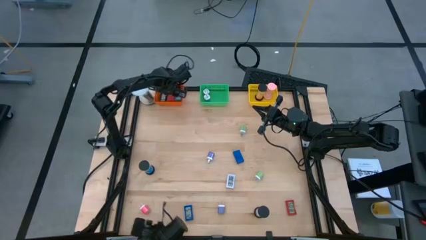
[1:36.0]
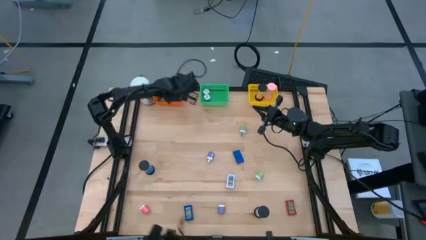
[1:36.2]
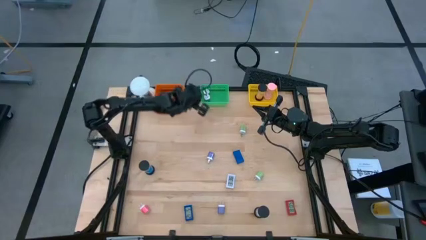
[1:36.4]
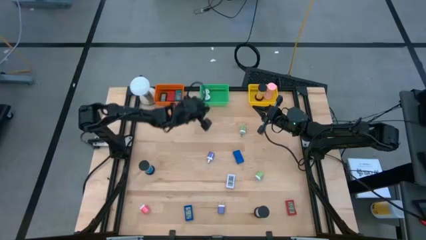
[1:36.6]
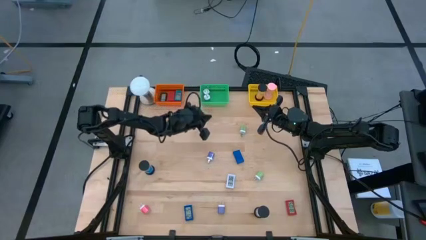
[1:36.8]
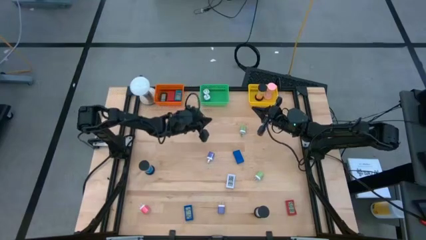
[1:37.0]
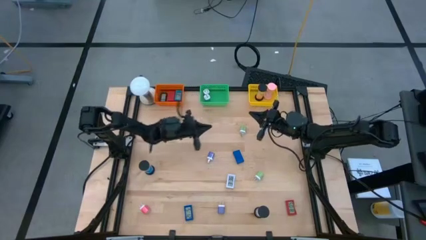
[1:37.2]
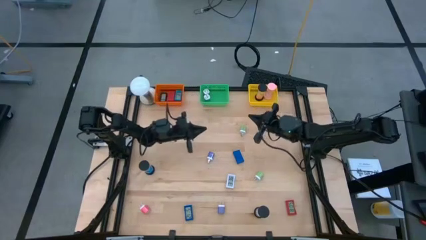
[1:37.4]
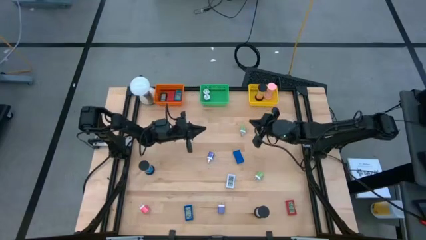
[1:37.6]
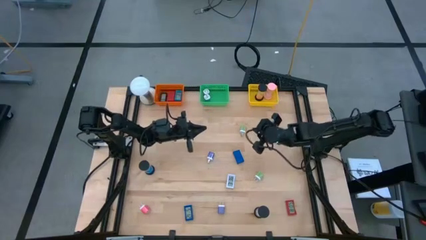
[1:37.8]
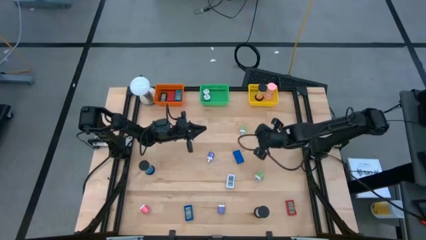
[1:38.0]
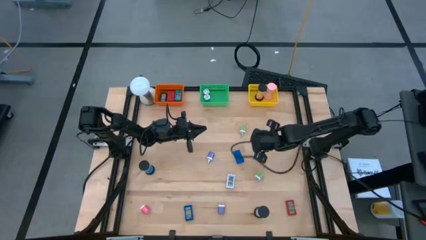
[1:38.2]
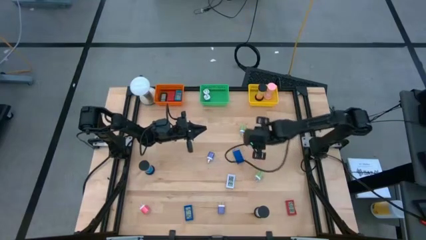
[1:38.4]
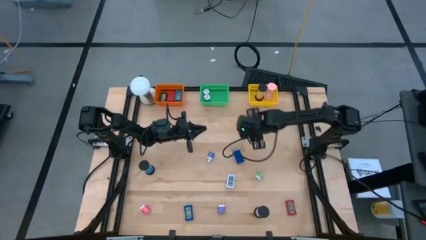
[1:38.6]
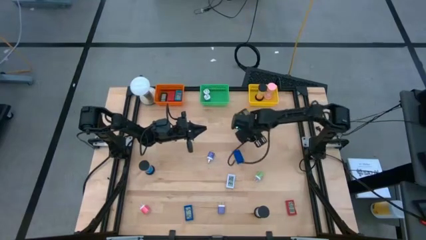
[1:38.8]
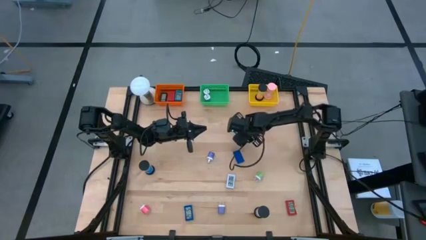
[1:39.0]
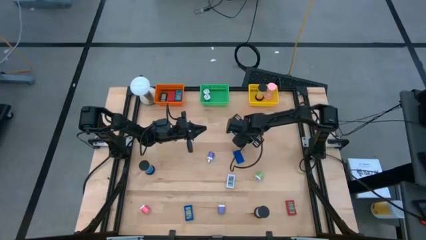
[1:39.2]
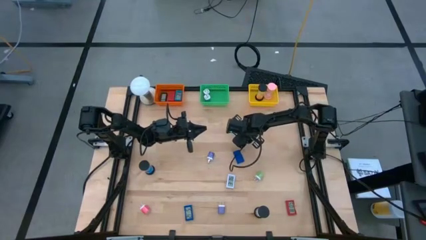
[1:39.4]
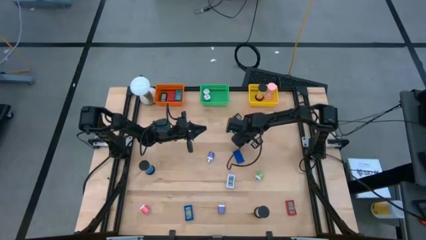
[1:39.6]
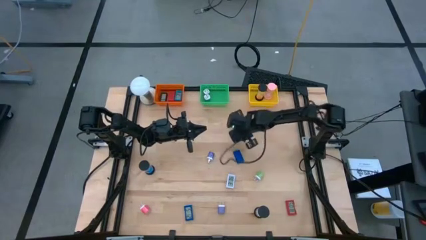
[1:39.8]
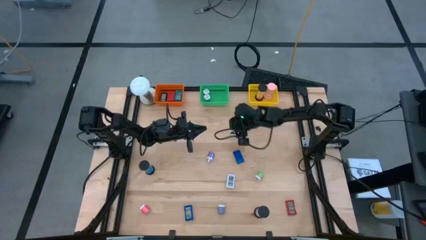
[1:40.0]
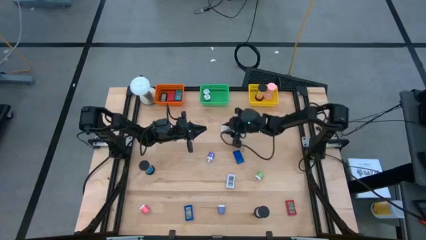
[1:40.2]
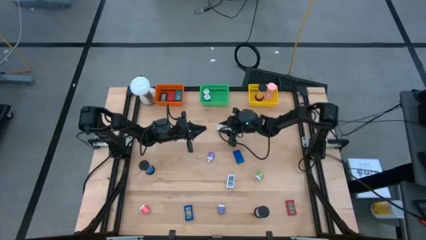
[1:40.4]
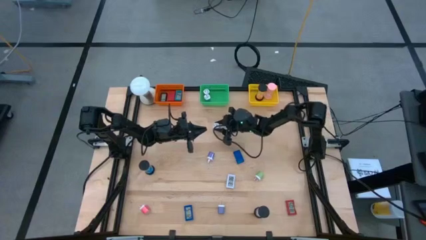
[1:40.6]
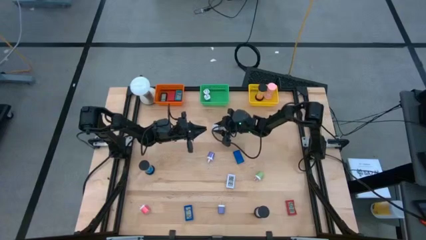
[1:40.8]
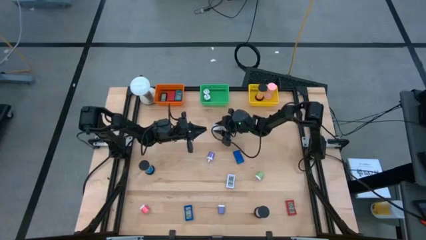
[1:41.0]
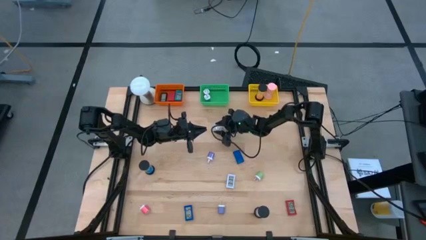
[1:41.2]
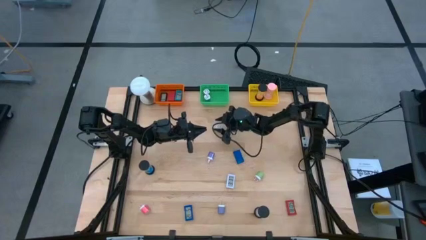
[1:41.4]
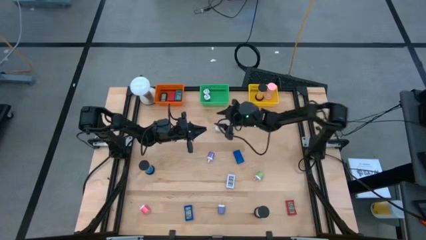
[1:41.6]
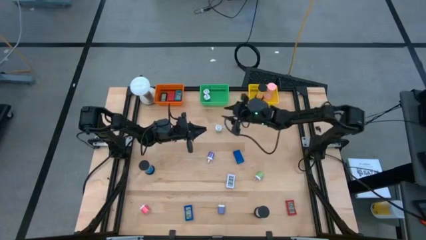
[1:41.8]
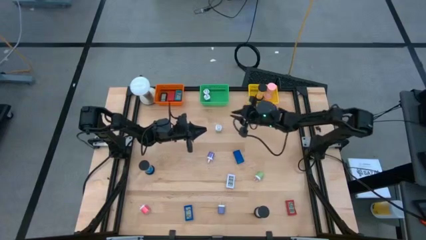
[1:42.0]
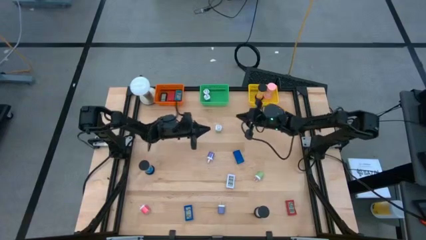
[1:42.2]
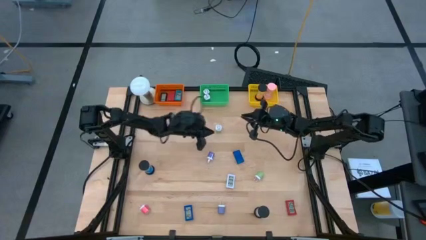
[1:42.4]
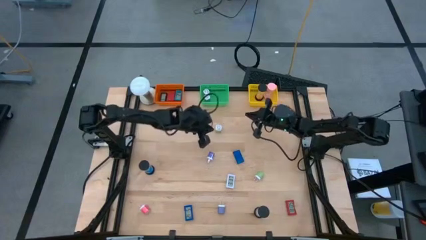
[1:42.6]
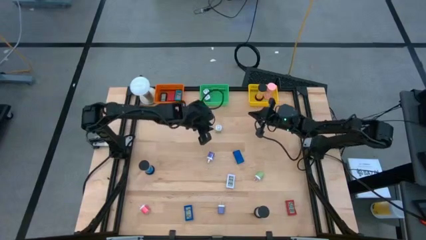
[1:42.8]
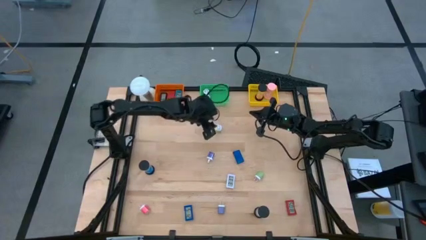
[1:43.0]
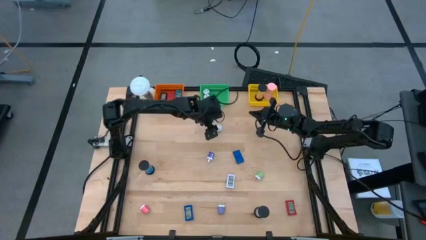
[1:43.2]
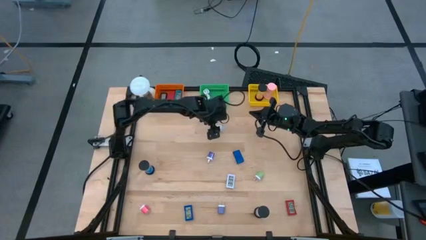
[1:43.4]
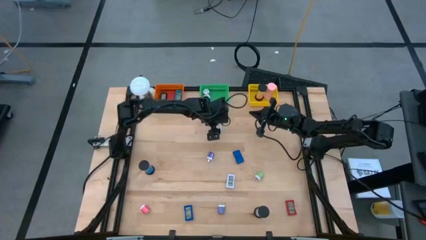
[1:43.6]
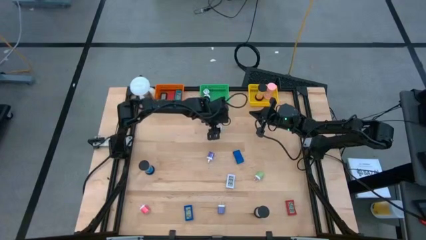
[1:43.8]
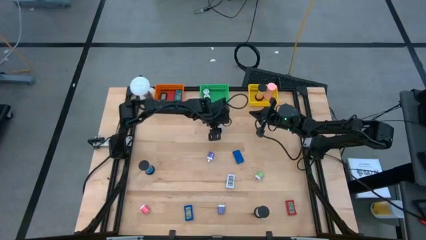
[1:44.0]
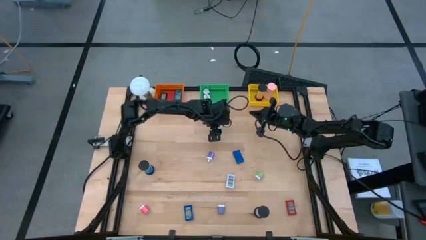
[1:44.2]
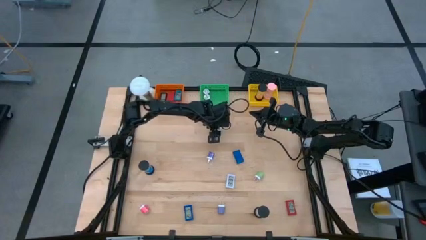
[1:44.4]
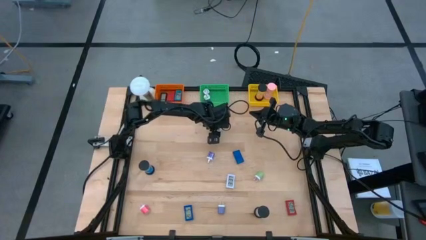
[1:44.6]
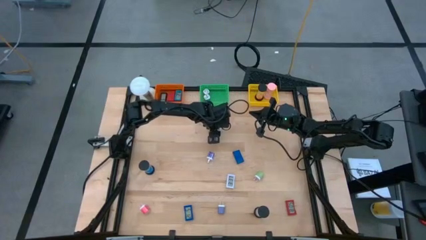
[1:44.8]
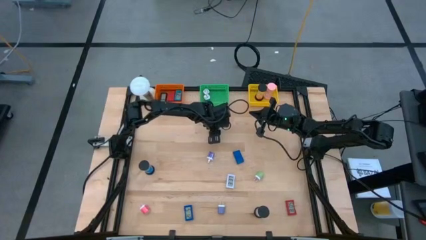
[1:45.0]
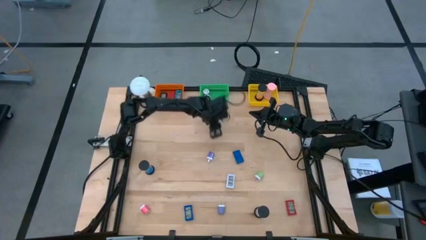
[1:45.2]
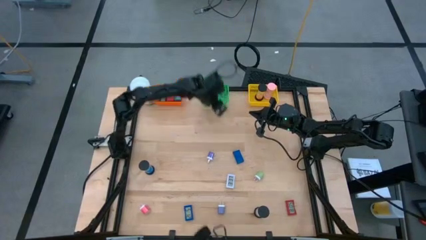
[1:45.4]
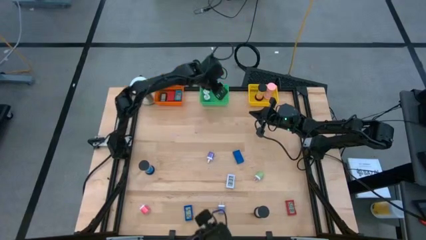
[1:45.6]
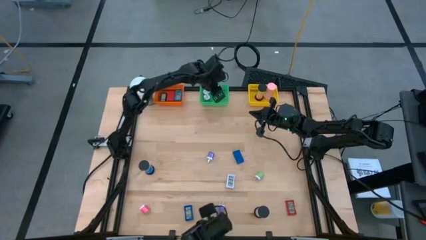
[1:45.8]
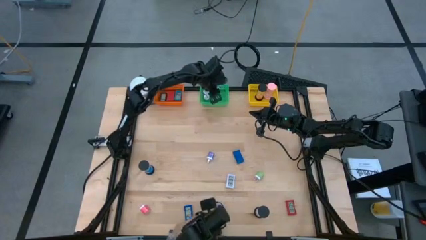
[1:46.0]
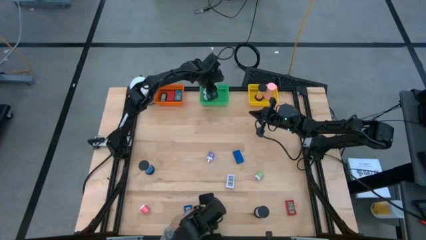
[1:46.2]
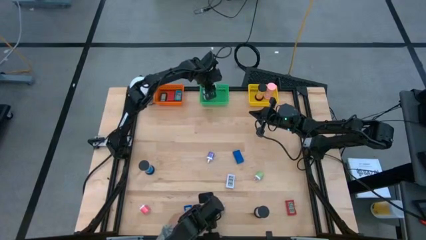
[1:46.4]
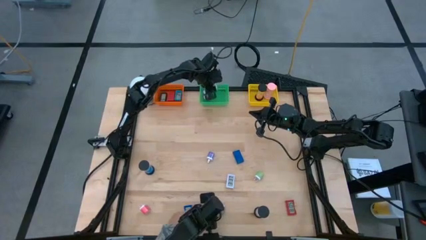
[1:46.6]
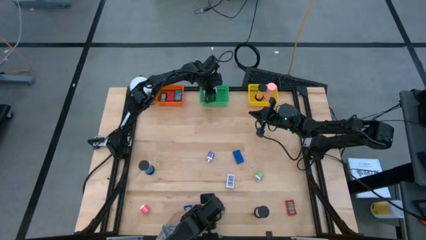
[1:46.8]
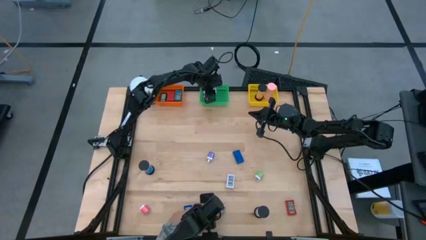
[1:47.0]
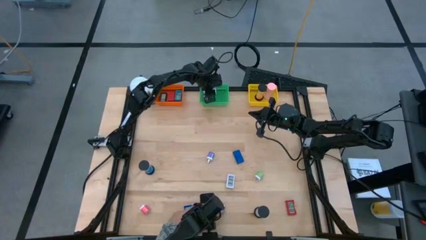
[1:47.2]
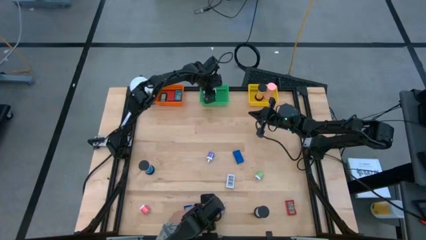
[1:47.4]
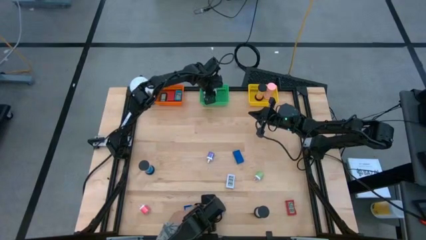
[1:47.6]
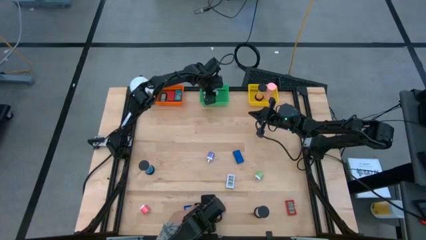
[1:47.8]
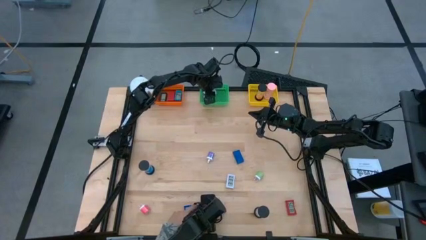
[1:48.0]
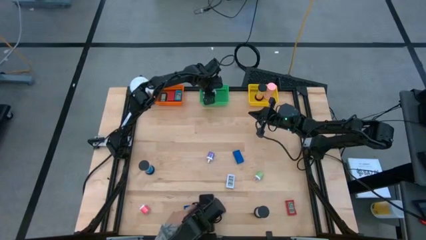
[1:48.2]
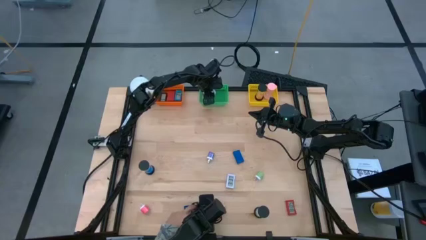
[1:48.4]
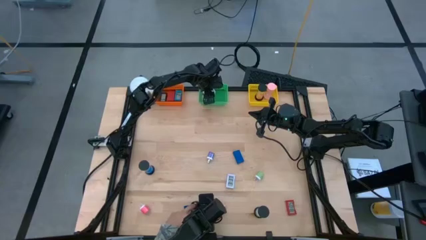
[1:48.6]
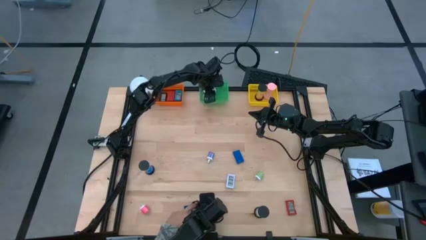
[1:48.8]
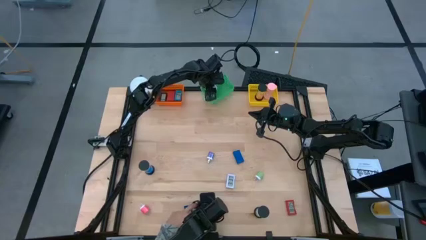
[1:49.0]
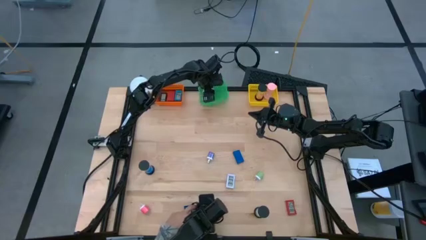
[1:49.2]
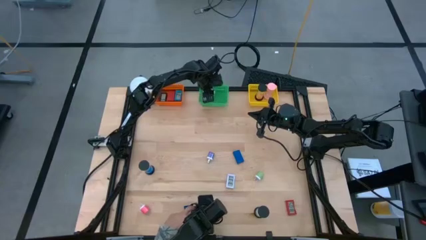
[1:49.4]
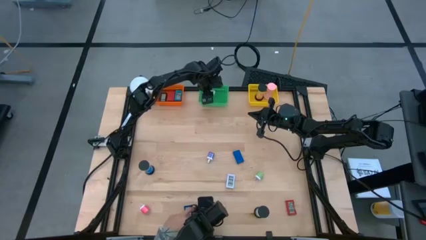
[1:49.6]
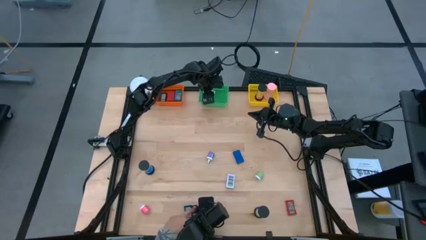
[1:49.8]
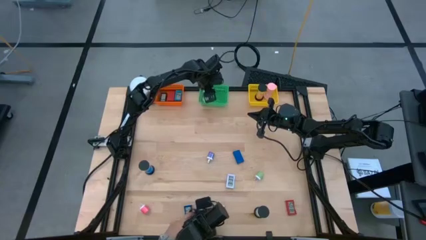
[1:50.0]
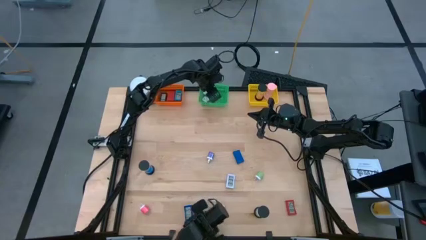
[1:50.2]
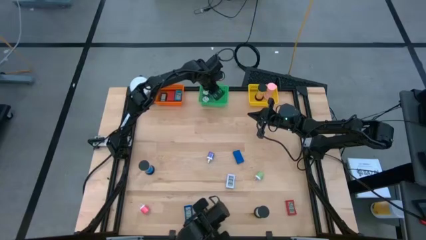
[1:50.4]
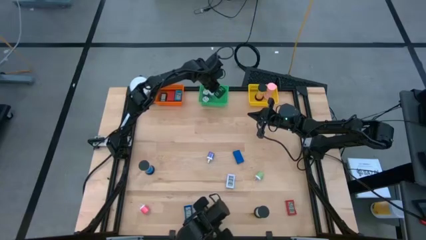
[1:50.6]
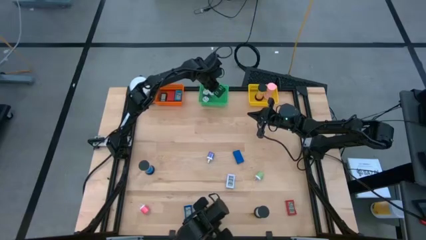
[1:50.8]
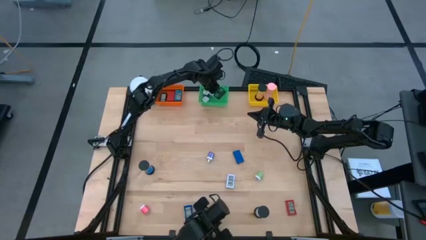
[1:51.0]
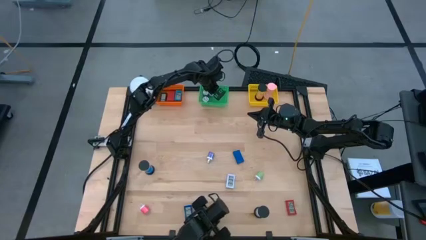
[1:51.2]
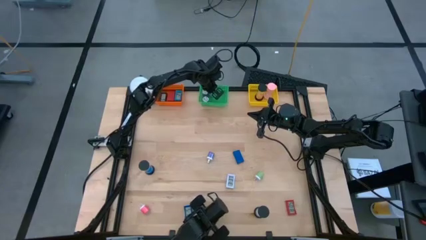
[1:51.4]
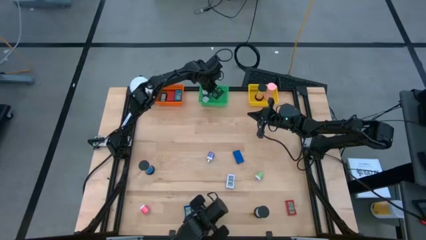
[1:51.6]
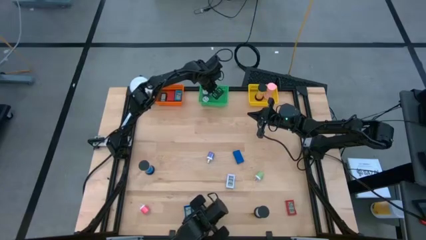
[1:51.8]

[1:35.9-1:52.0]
Task: Pick & Place Office items
Put the green charger adapter into the green basket
